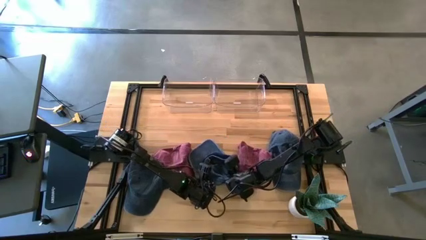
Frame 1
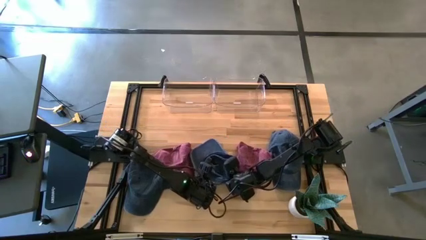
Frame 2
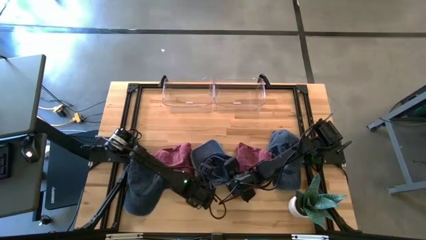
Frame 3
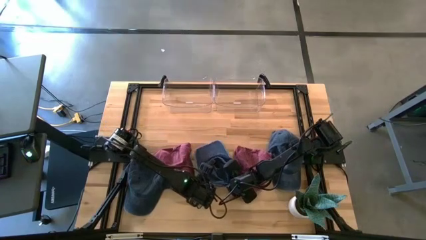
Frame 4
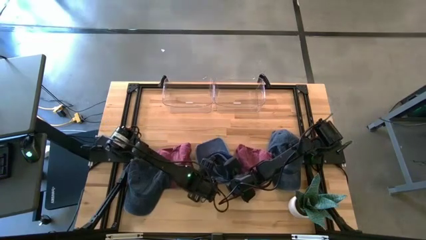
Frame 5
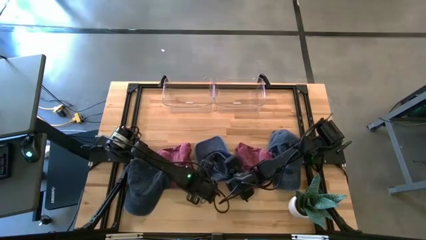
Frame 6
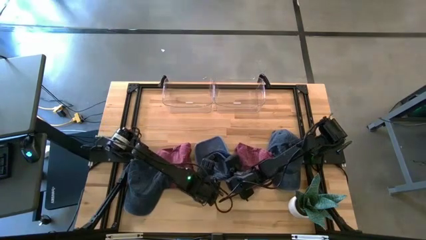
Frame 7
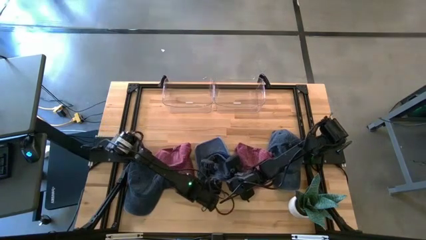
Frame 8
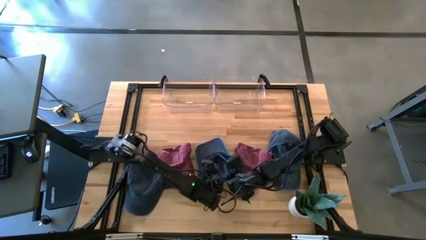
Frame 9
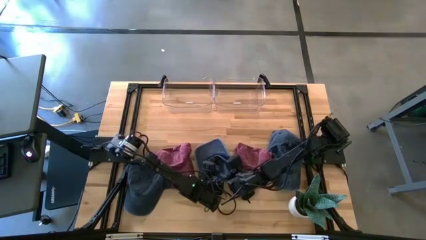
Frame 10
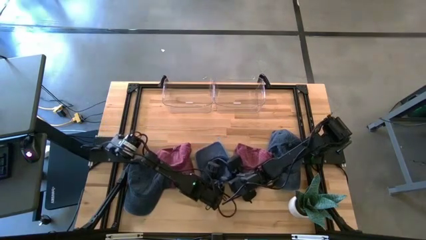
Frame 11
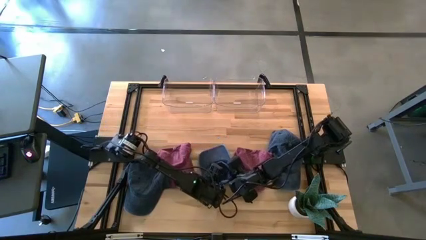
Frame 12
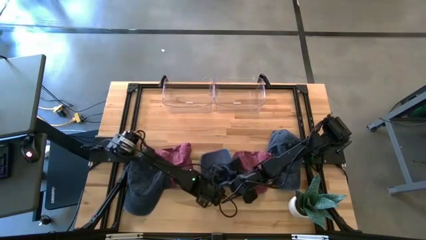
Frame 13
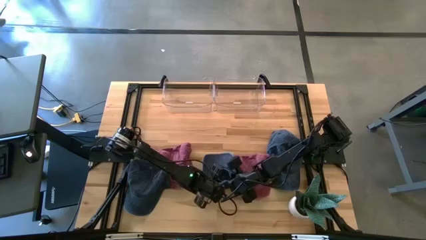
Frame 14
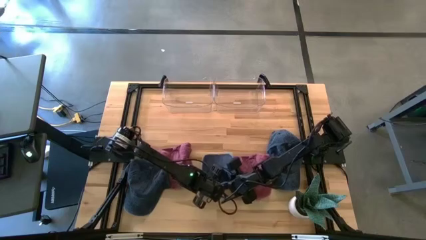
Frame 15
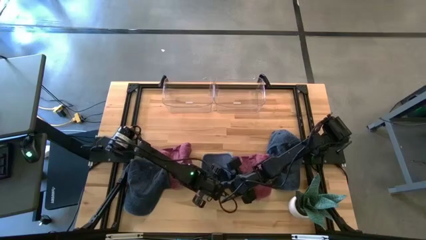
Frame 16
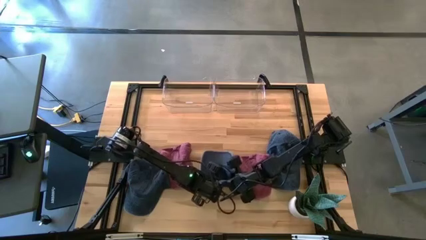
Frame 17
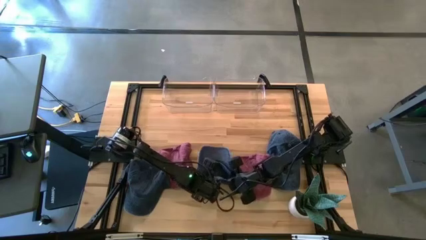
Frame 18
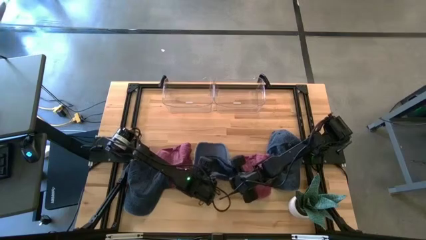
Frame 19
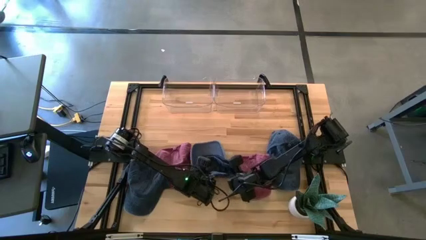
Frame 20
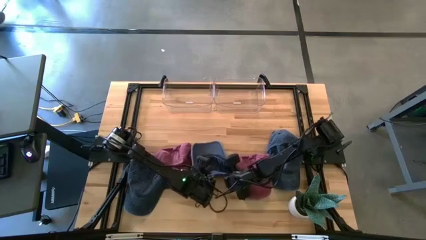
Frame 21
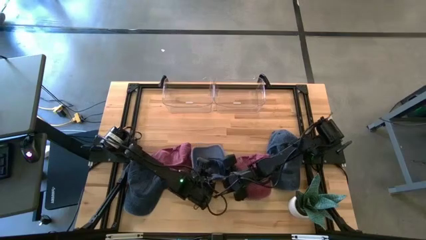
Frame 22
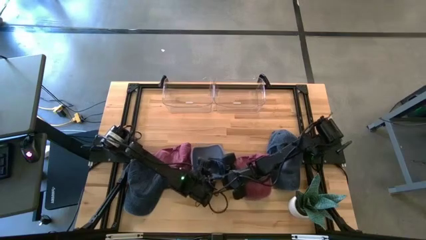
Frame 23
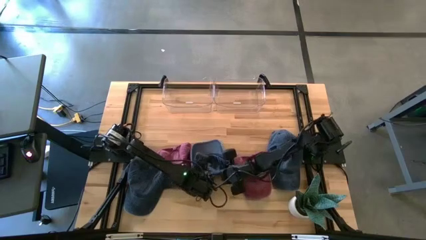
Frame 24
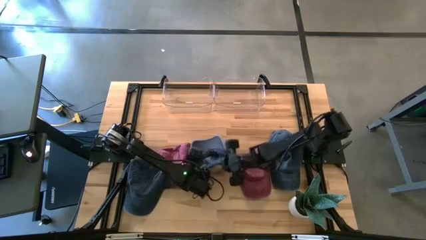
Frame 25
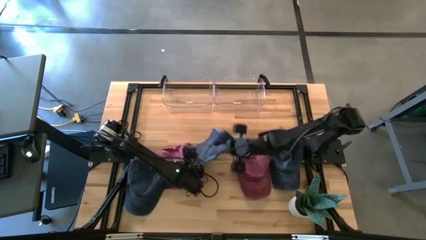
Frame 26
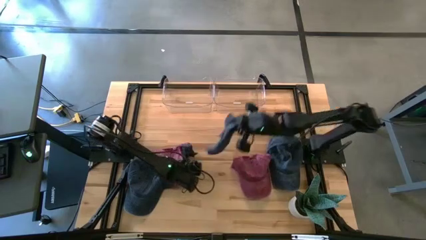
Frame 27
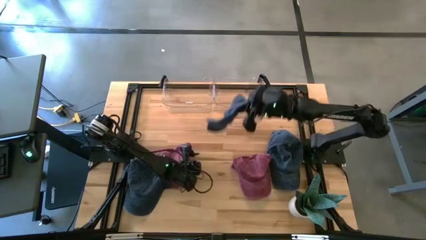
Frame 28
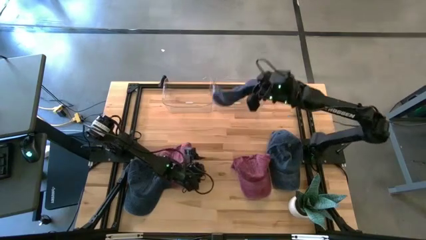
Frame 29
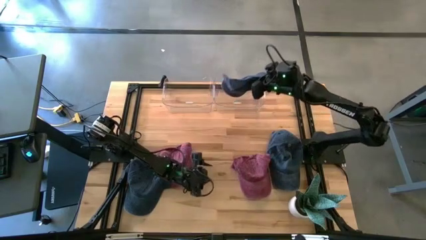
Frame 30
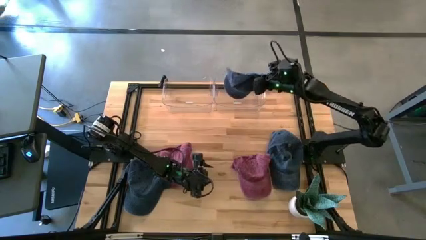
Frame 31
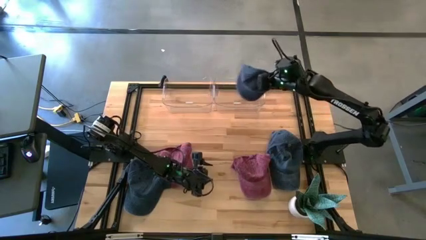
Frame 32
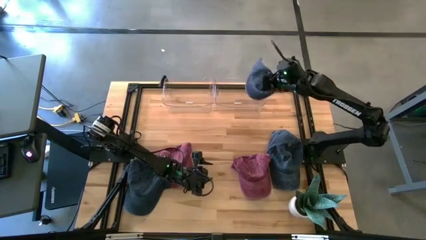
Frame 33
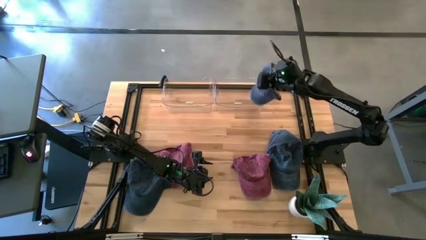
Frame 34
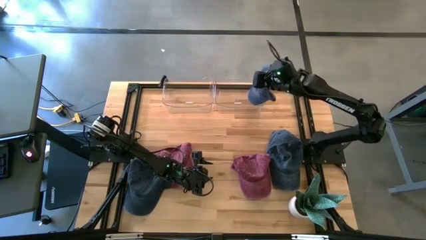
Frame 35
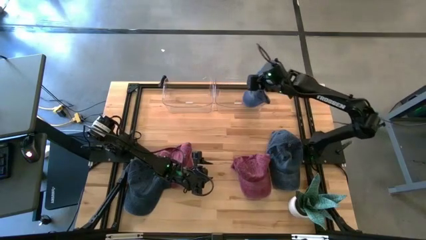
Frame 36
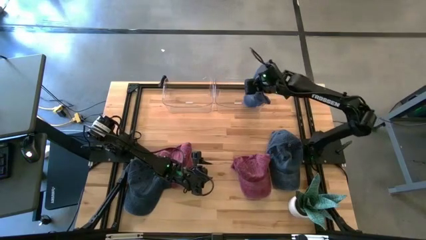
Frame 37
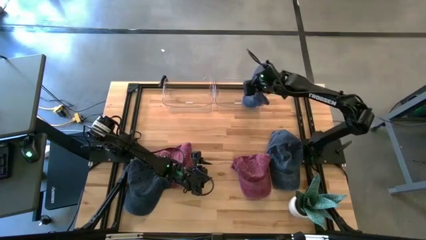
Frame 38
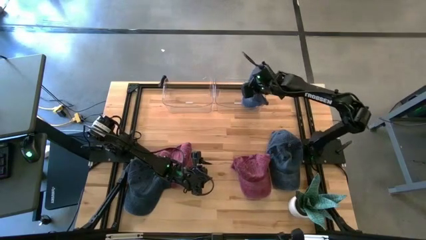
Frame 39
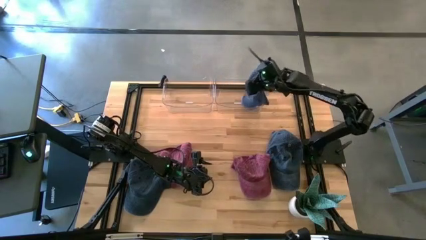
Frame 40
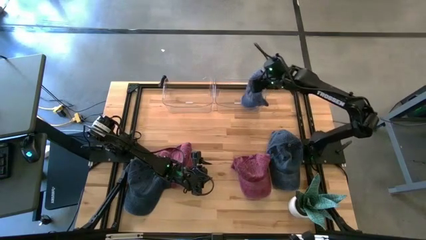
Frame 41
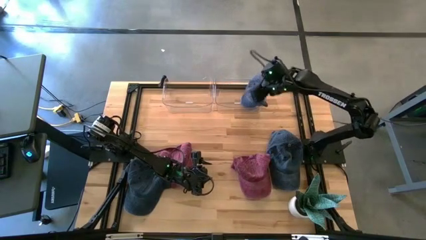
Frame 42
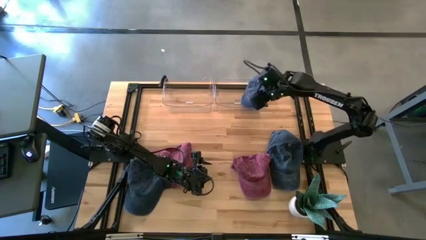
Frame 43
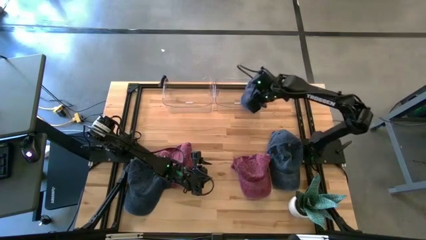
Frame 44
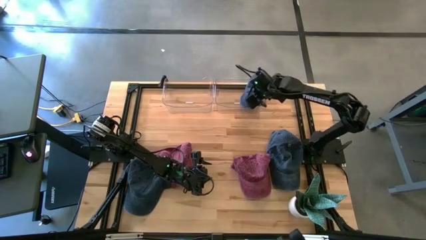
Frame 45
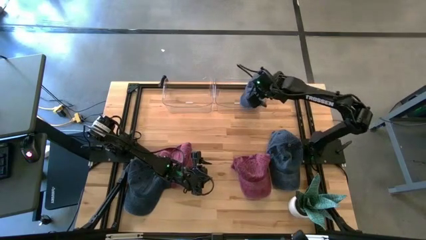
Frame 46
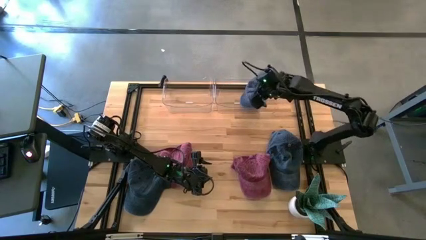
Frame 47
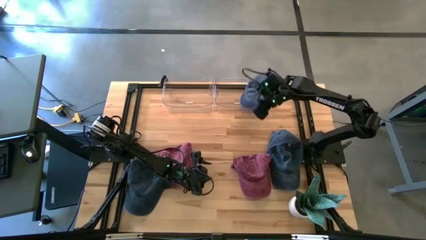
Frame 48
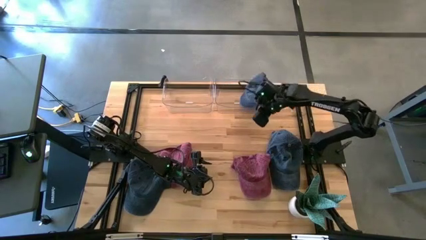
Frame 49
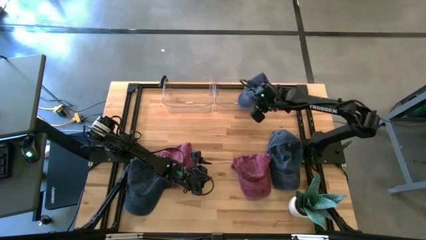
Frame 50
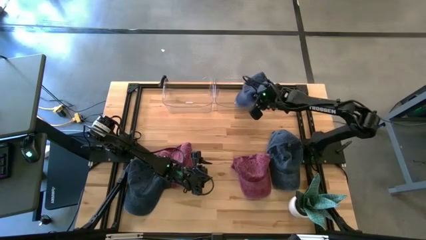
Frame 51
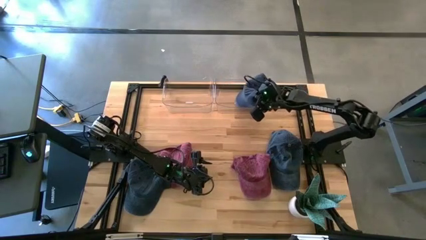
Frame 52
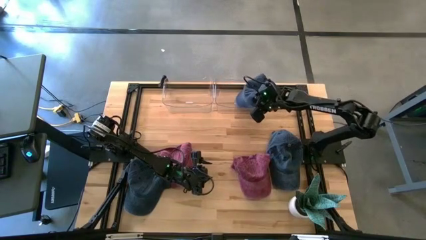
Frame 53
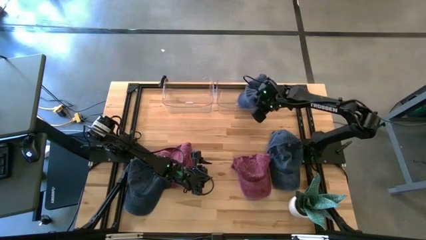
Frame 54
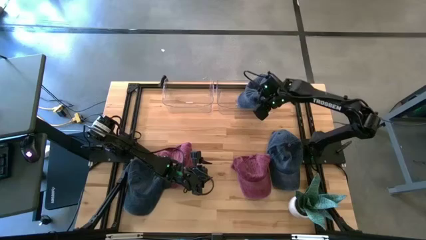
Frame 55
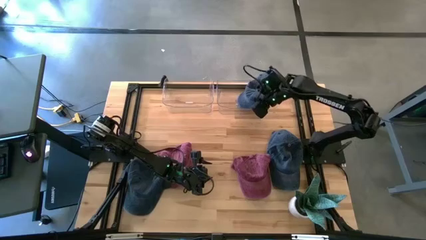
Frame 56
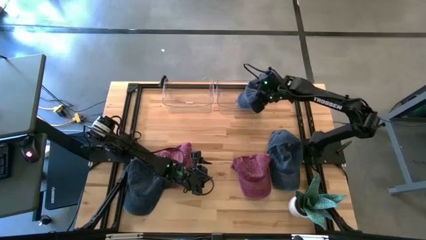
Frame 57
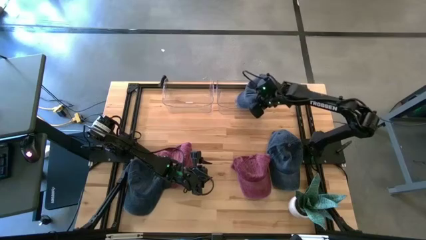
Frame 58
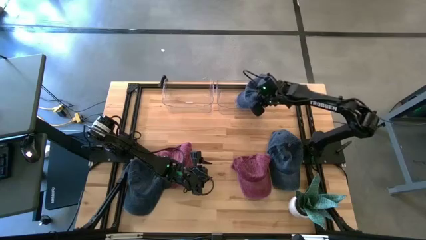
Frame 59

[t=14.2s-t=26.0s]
Task: Pick & Place hat
Put the middle blue cap into the right transparent bin

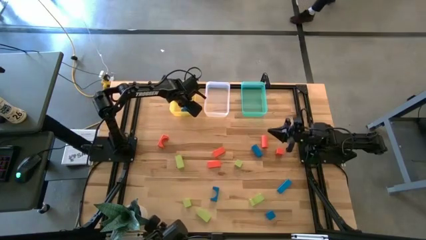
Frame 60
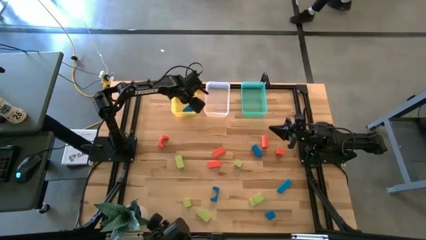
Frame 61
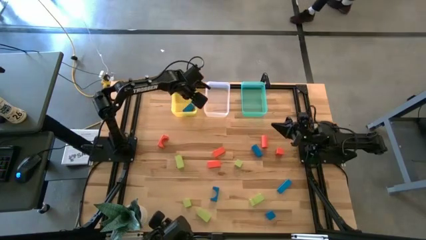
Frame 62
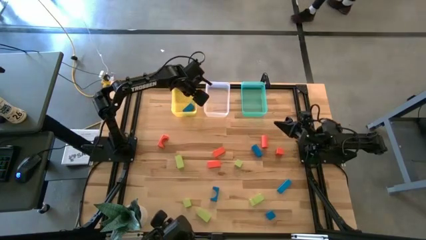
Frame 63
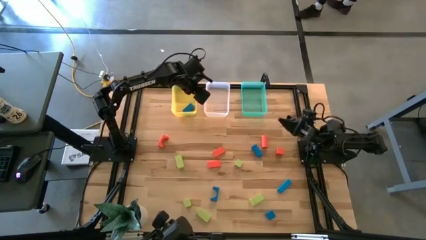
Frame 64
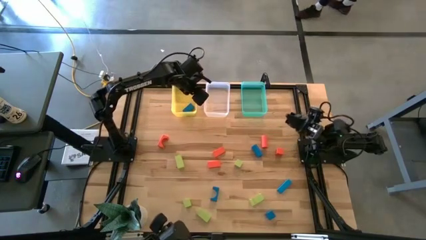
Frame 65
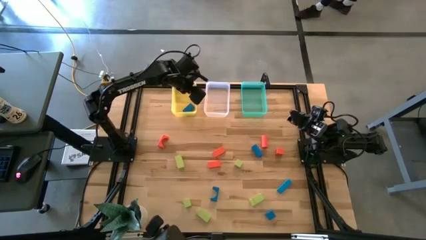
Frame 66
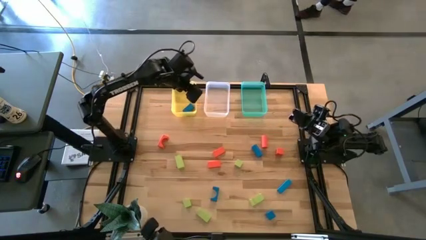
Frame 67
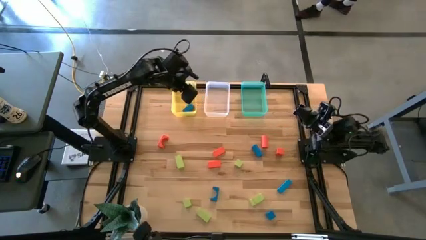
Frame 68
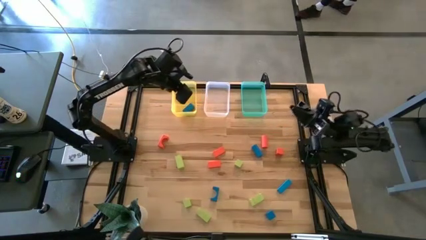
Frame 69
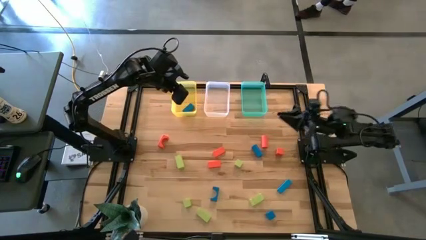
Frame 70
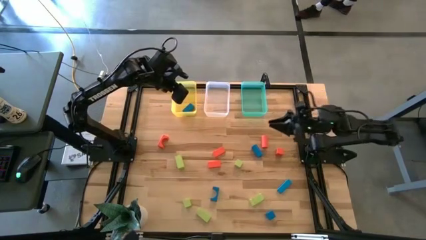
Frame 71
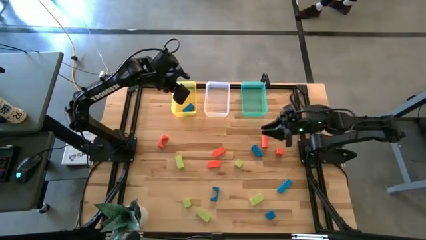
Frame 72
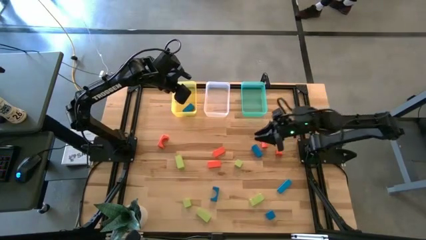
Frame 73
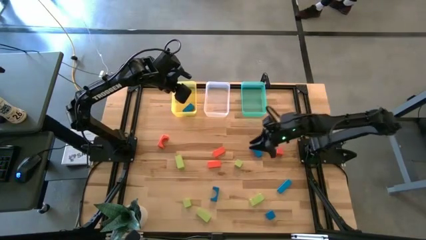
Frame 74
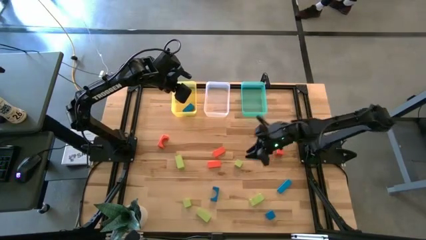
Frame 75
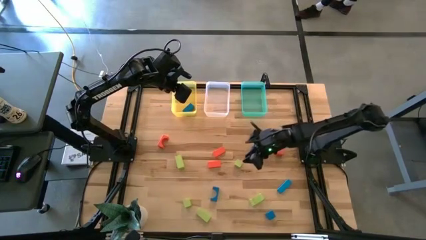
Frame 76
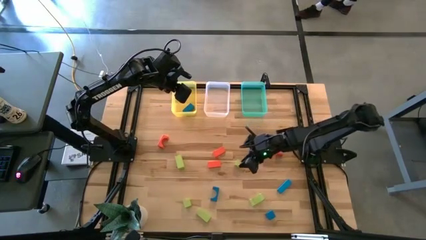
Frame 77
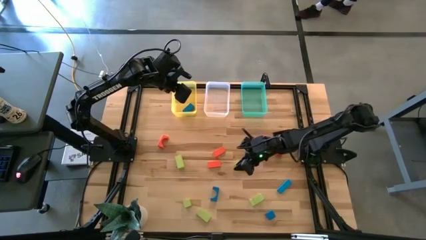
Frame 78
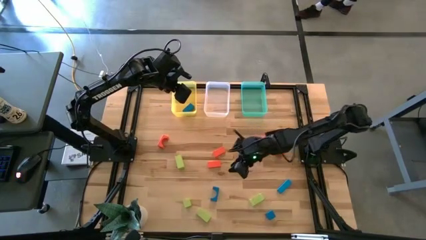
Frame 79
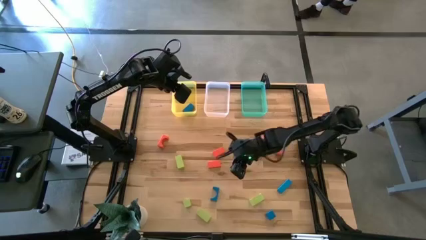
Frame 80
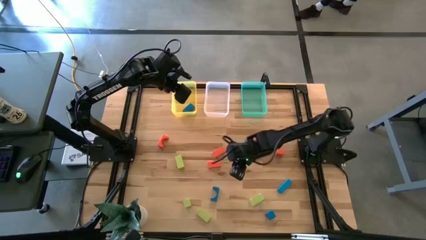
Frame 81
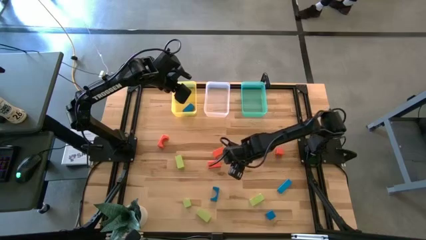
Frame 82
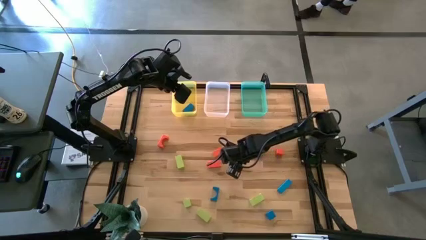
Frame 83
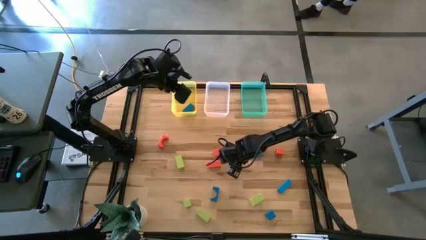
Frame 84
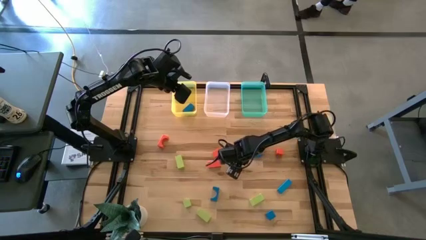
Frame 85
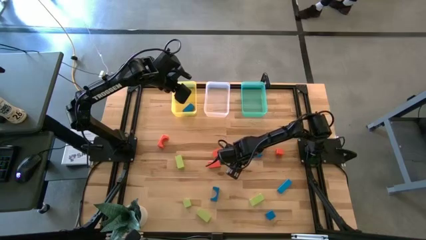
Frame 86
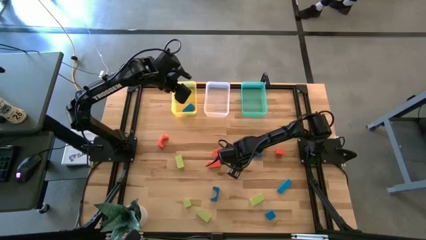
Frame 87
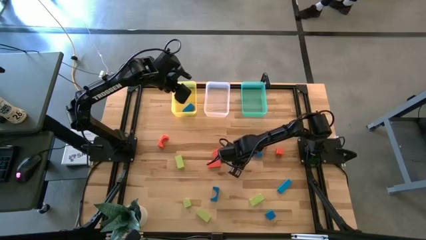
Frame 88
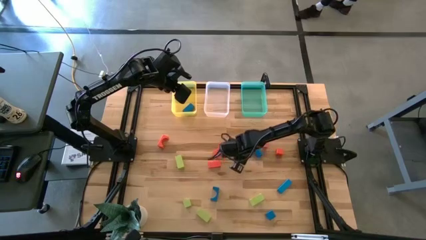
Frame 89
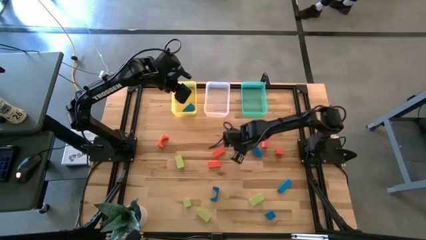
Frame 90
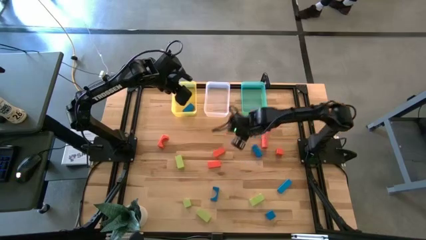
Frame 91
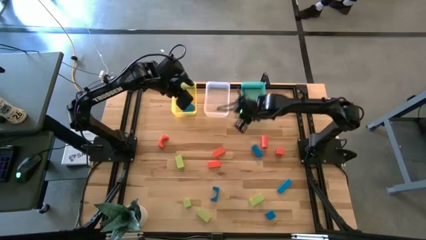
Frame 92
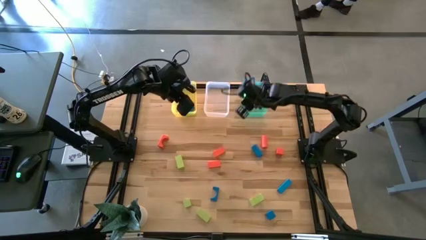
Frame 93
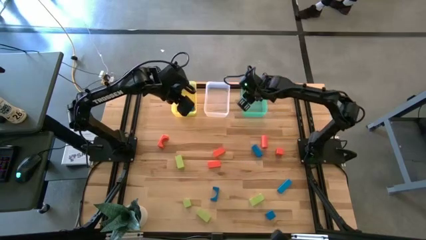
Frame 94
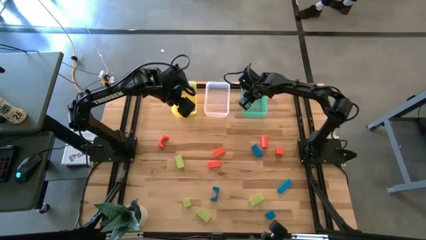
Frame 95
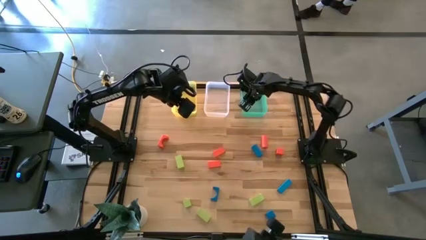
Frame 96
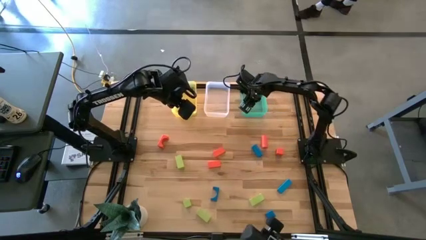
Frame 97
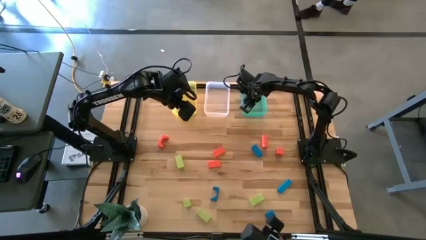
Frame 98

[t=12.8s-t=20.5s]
Task: Sort & place blocks by color
Put the green block into the blue bin
